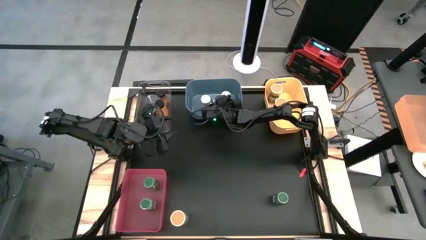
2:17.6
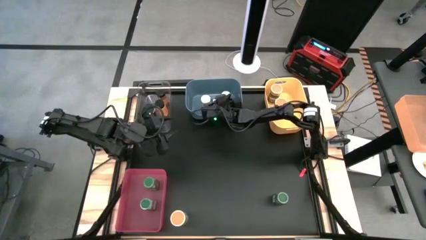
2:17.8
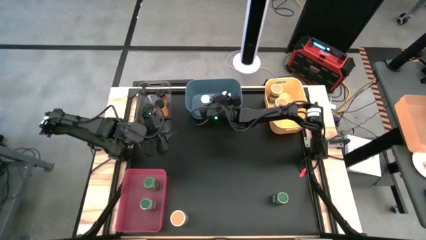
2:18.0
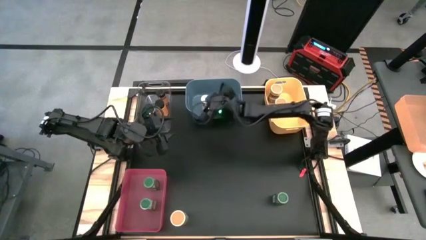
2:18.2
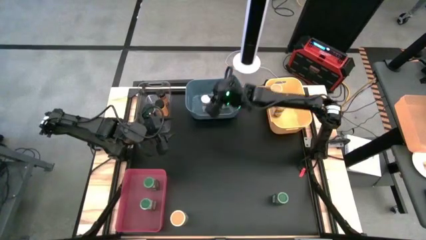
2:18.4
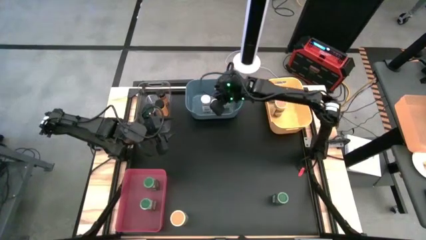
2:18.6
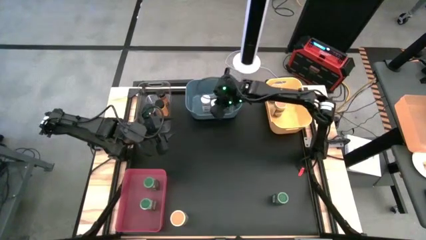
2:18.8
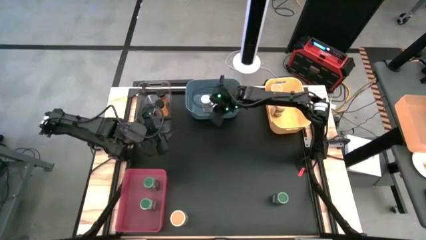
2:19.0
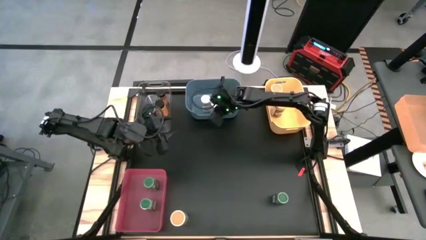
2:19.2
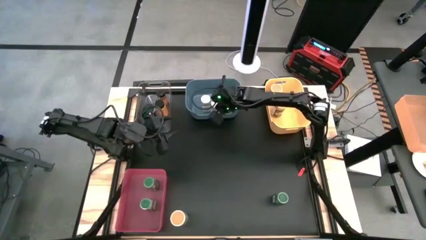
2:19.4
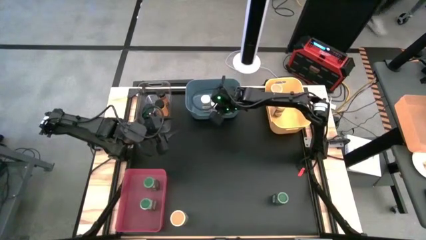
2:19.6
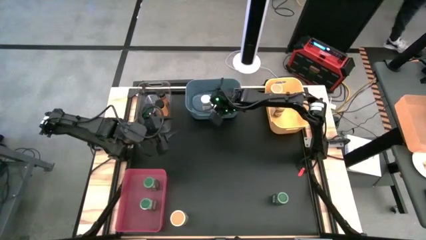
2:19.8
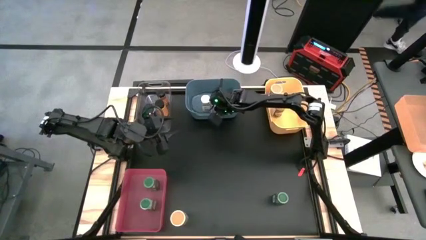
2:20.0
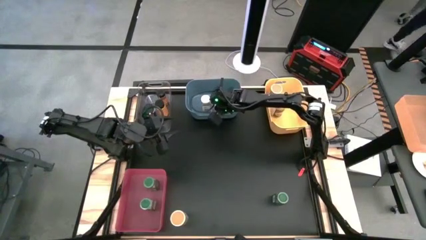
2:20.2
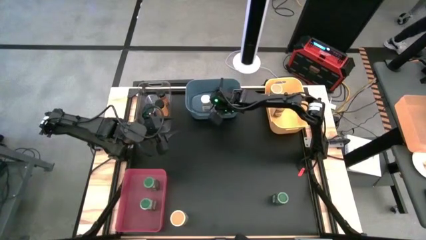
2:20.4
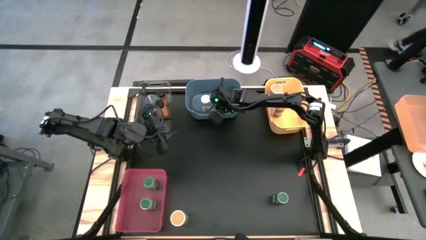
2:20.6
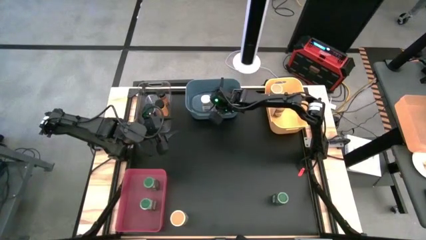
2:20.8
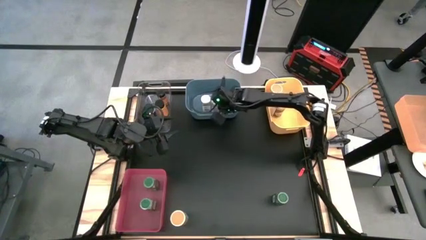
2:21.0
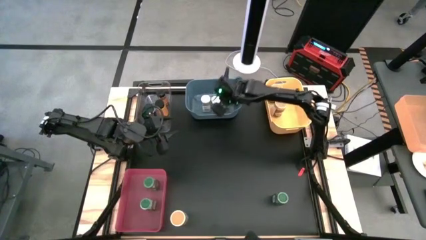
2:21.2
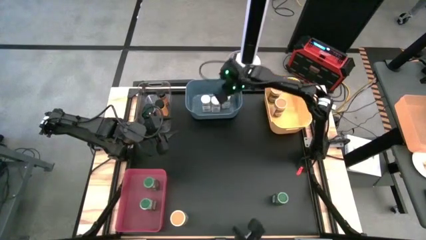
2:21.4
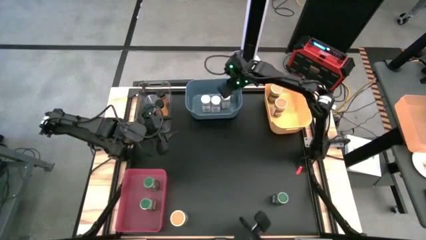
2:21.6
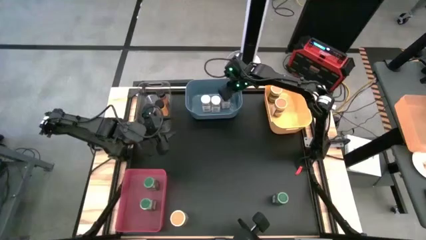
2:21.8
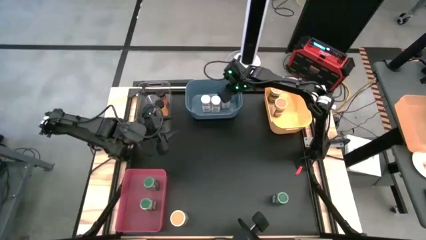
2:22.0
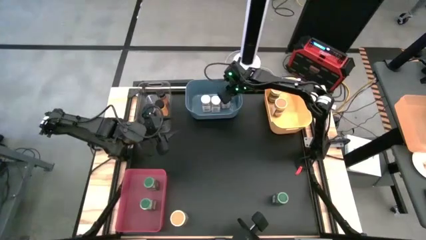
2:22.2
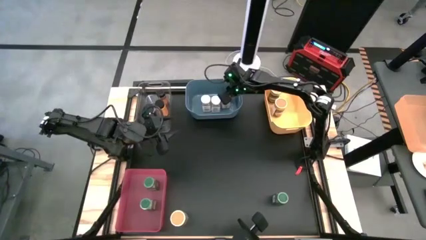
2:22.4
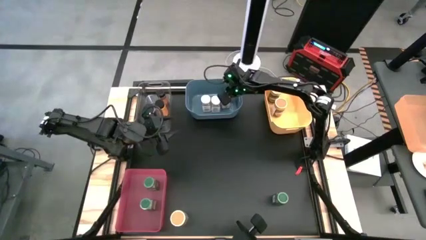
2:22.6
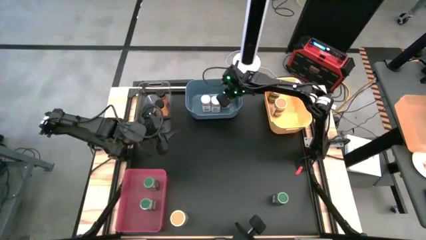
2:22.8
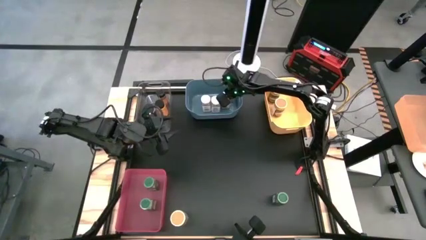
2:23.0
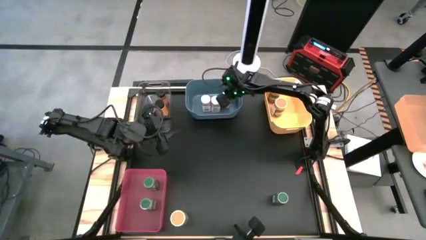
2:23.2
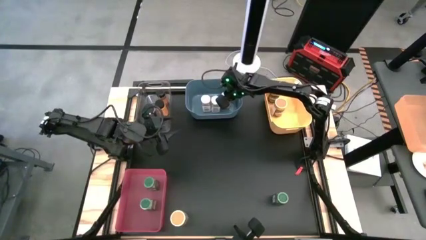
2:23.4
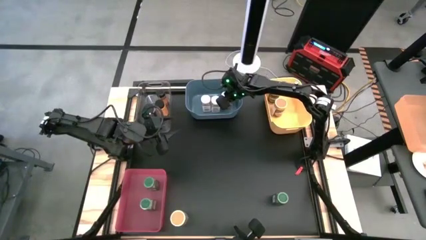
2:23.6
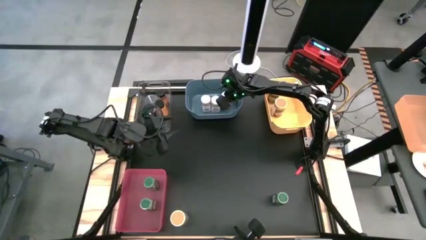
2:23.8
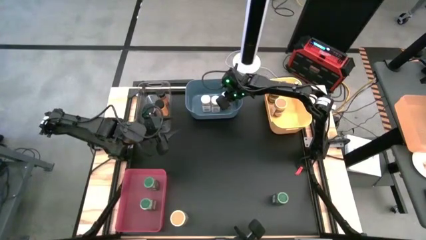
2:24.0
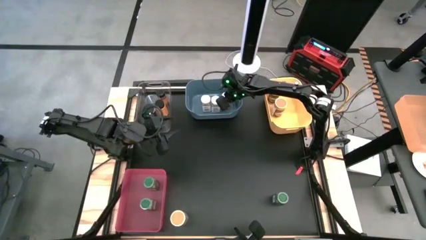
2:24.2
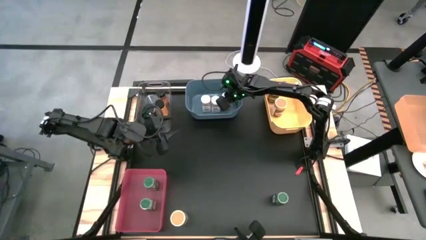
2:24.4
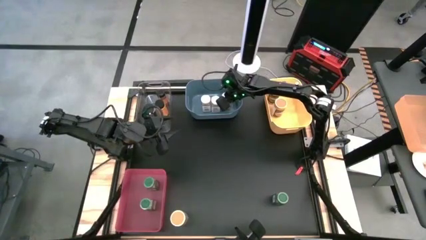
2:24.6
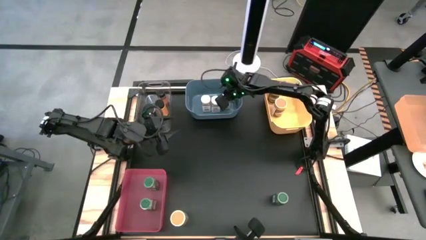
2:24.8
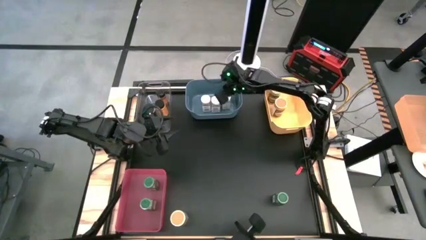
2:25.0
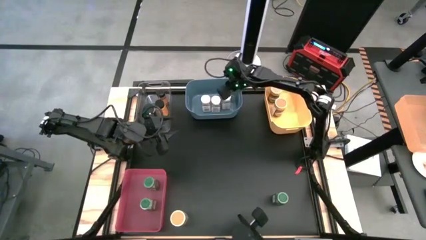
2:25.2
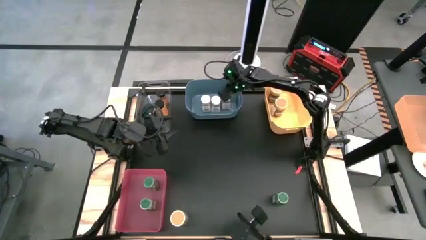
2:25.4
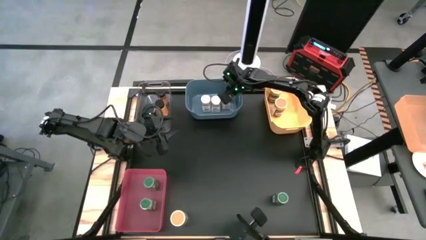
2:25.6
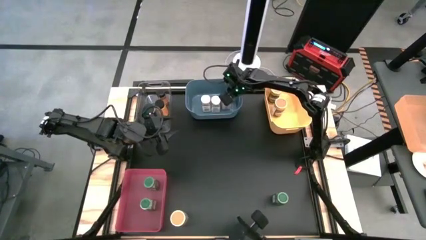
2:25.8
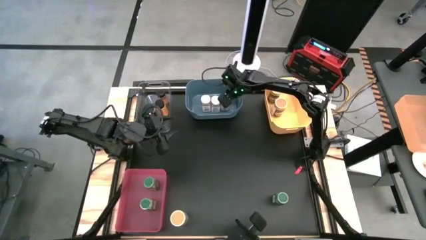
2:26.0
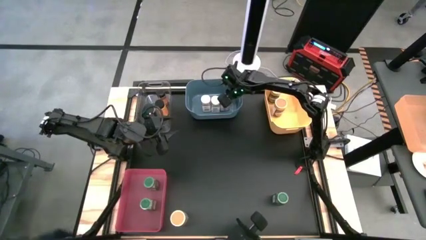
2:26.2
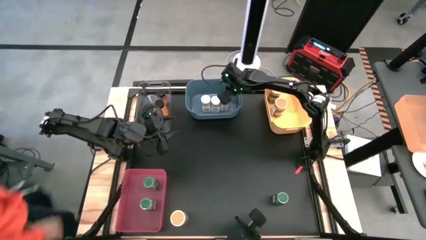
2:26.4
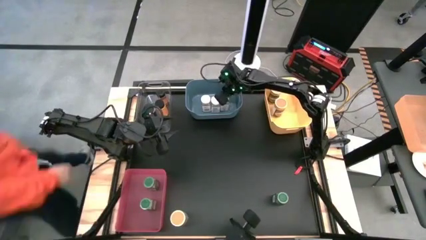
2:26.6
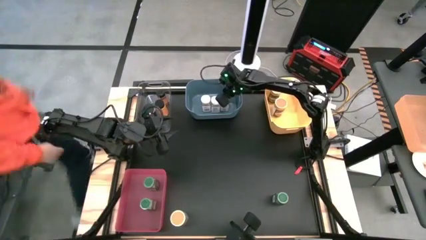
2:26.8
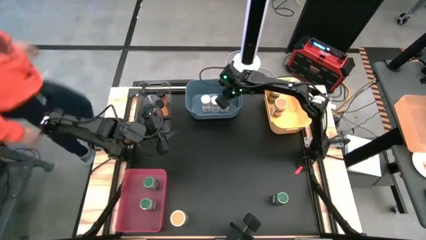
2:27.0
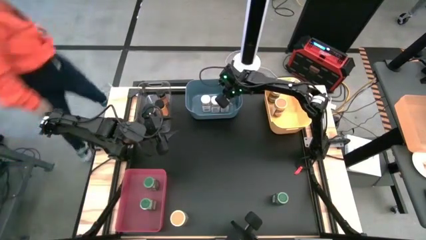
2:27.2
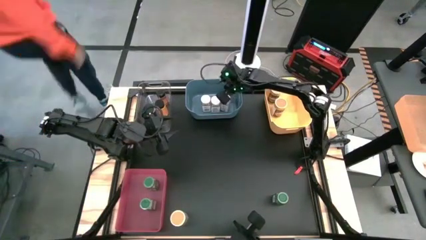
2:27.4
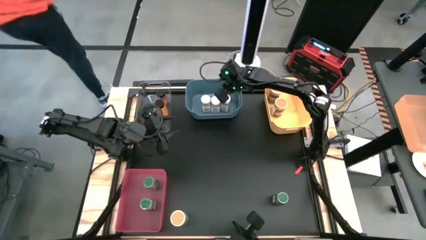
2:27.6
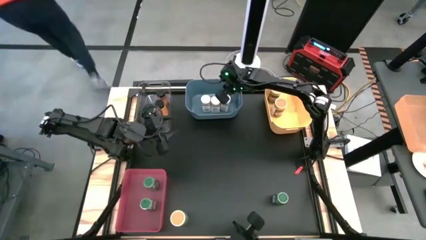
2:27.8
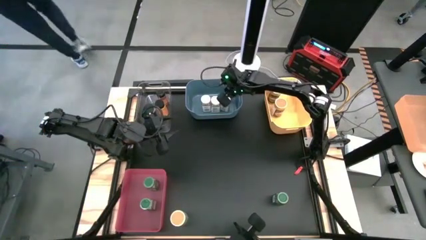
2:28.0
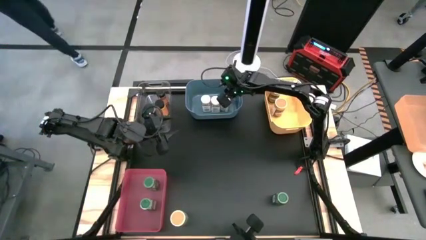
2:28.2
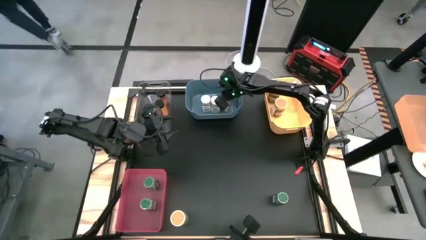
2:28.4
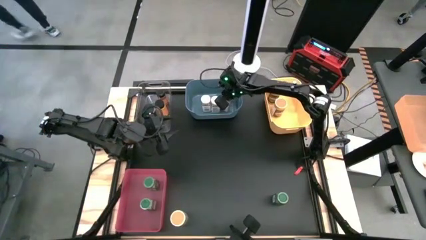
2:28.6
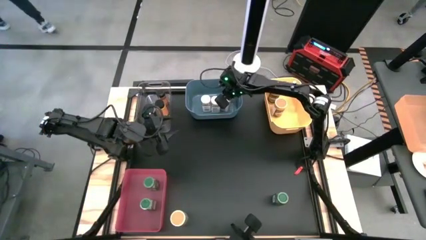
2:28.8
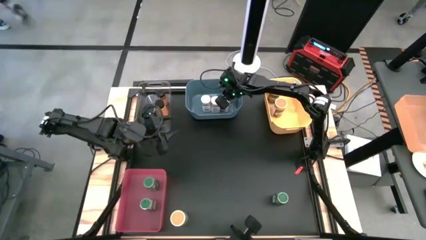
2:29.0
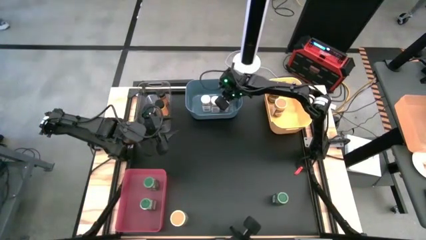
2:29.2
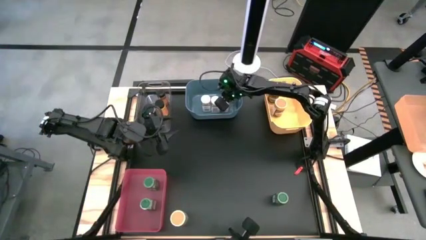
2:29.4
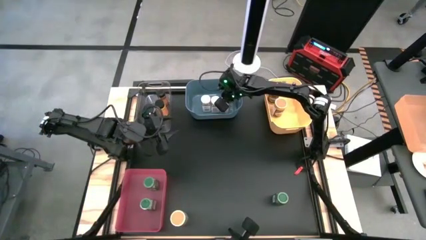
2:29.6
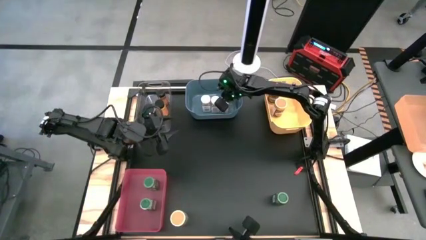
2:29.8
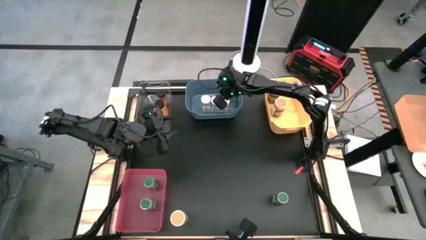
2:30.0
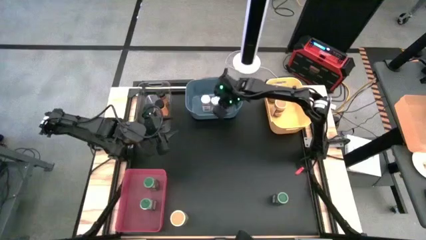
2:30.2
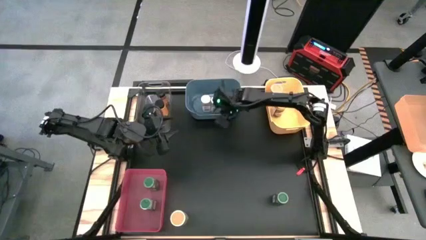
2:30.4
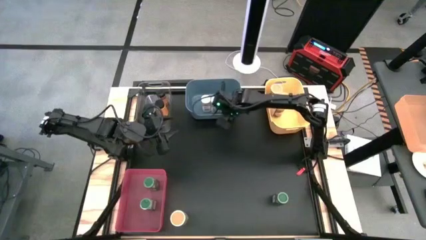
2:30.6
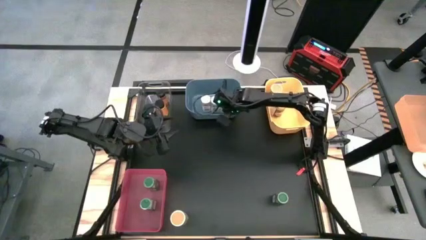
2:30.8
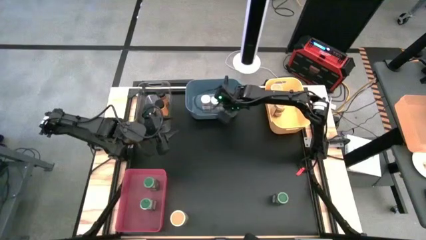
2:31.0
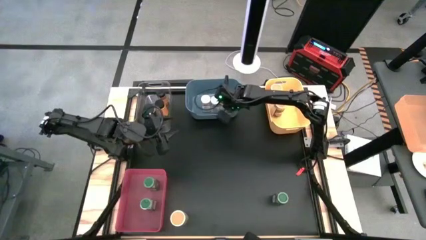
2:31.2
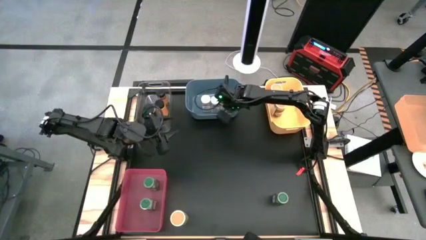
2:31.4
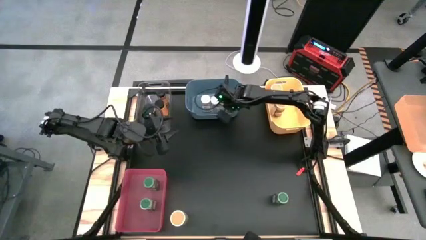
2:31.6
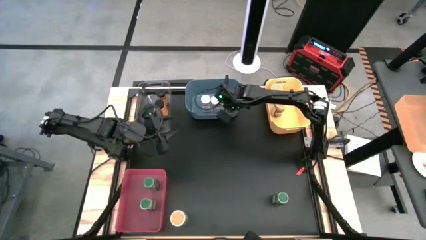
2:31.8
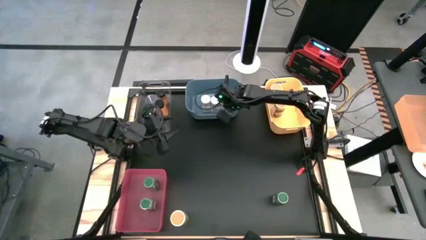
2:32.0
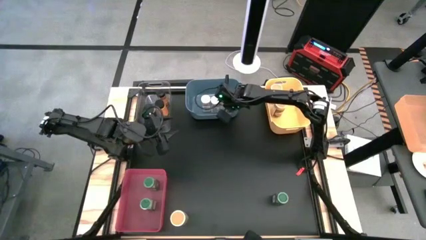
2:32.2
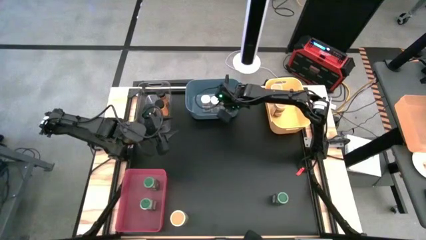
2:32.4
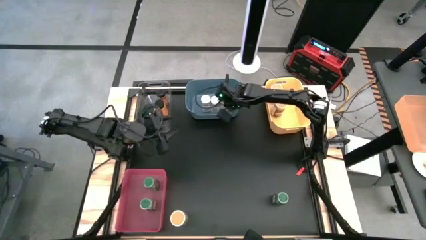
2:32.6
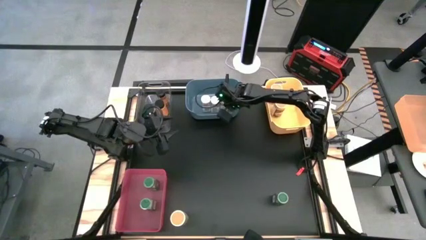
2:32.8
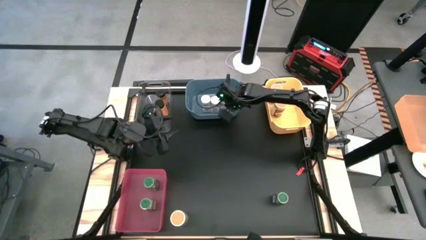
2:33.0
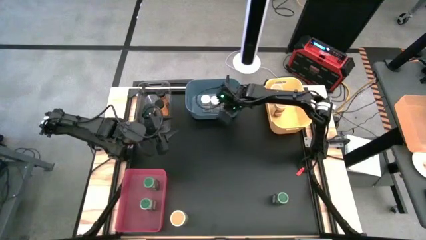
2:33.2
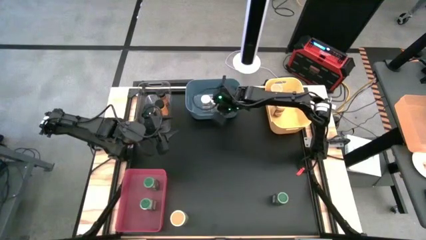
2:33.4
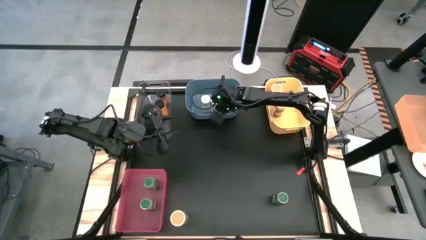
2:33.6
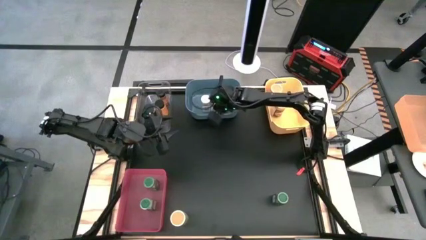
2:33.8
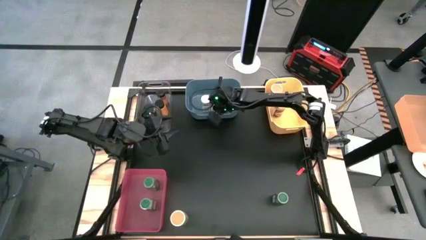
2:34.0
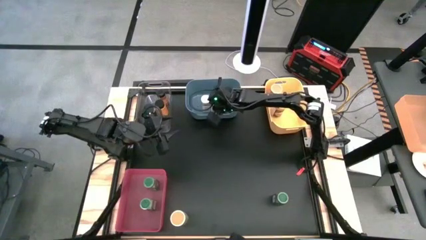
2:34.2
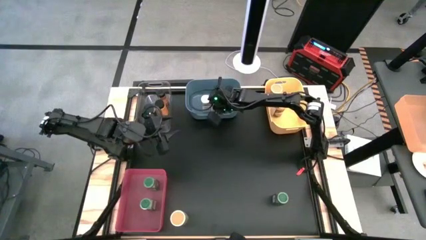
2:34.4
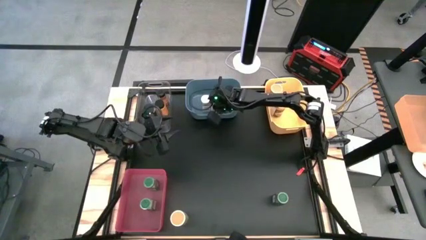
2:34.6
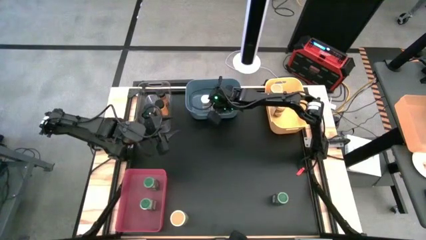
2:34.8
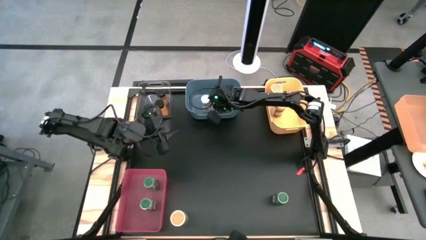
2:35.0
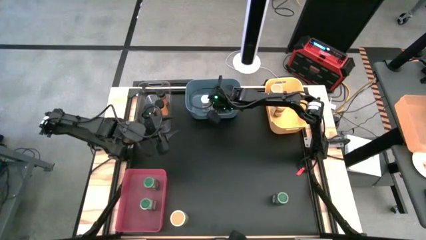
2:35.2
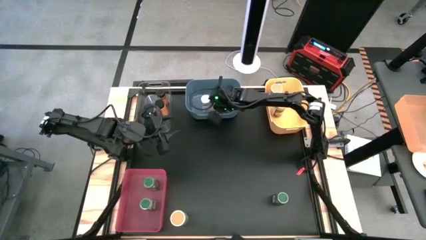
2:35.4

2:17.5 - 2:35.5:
Task: Sort spices by type
Adjust the white seasoning bottles
